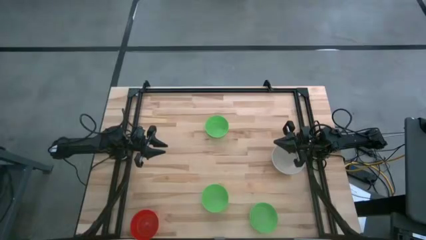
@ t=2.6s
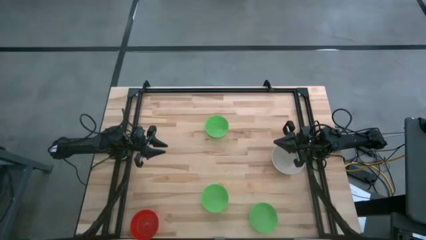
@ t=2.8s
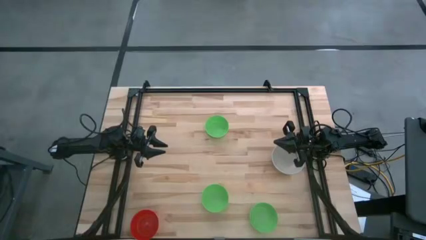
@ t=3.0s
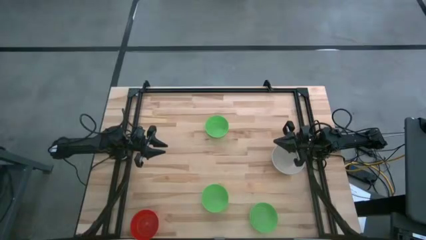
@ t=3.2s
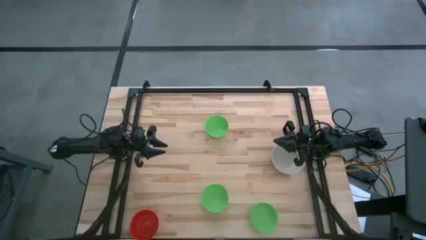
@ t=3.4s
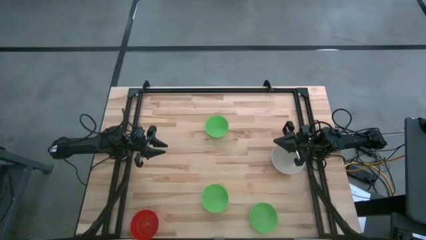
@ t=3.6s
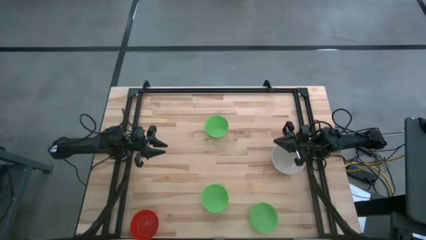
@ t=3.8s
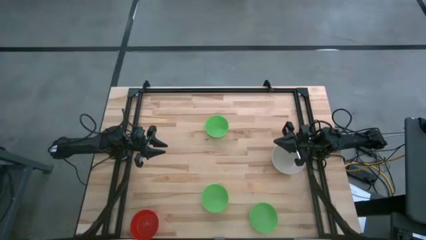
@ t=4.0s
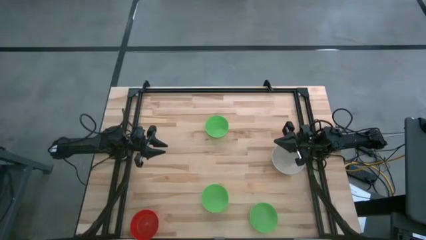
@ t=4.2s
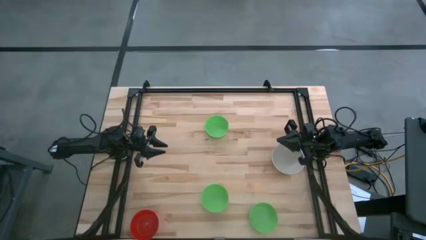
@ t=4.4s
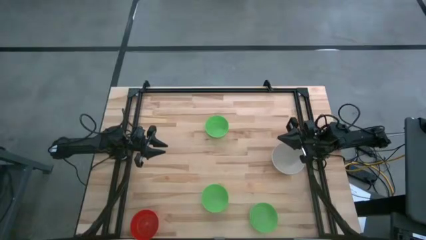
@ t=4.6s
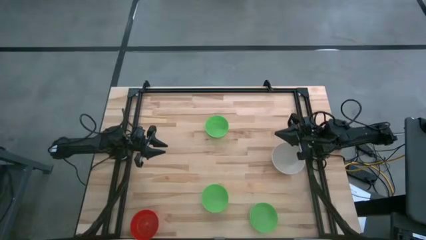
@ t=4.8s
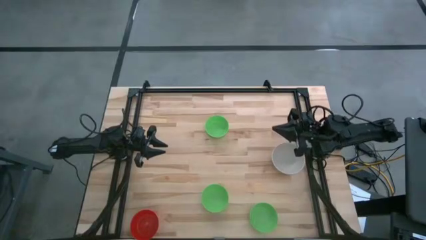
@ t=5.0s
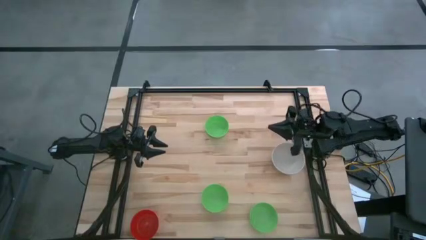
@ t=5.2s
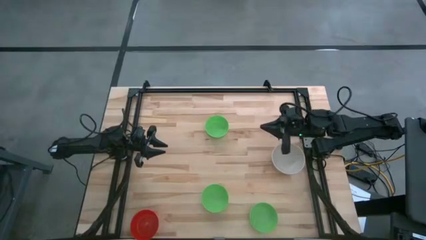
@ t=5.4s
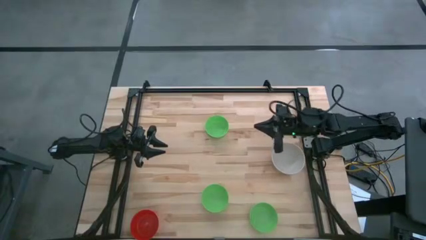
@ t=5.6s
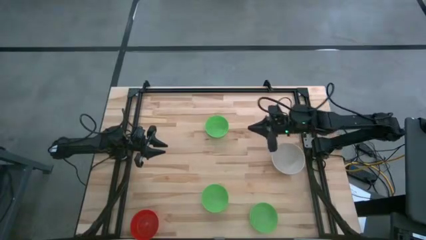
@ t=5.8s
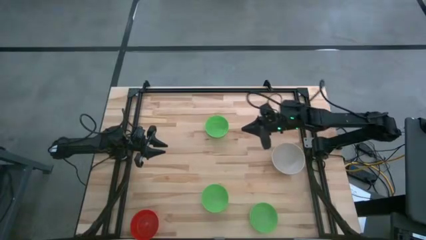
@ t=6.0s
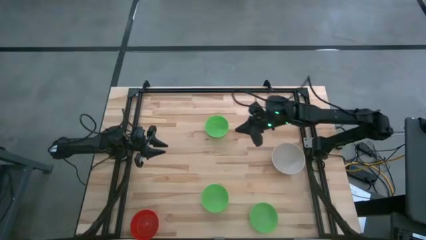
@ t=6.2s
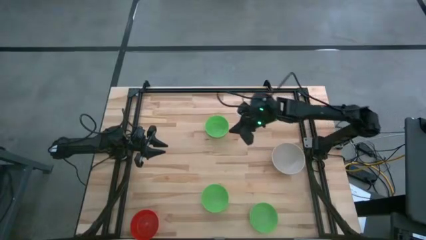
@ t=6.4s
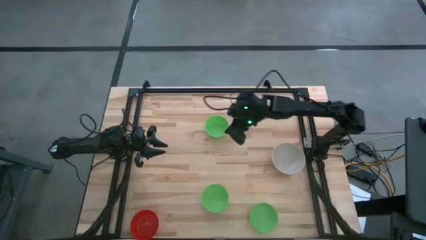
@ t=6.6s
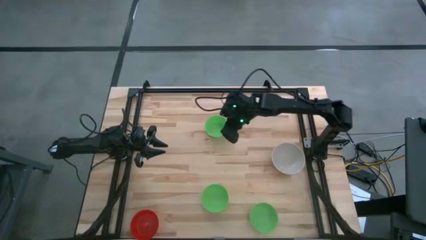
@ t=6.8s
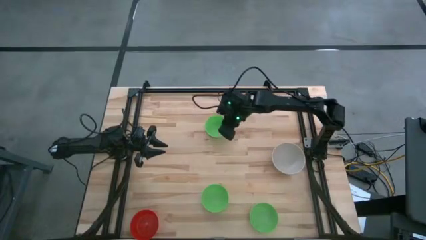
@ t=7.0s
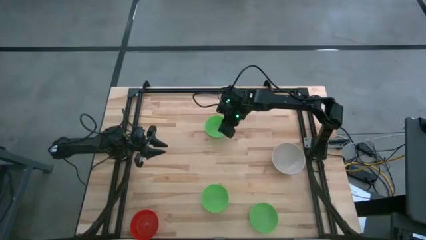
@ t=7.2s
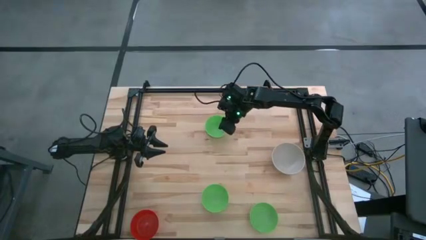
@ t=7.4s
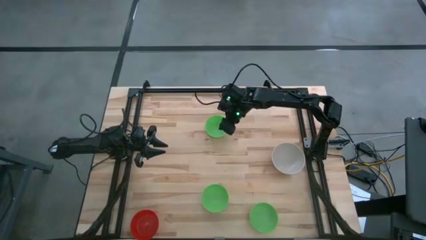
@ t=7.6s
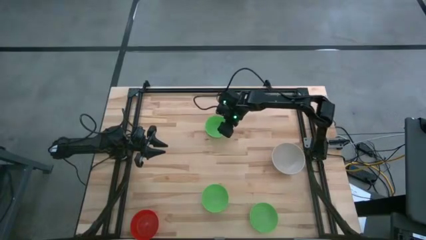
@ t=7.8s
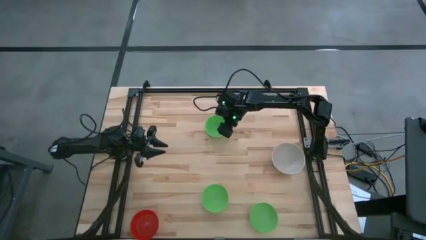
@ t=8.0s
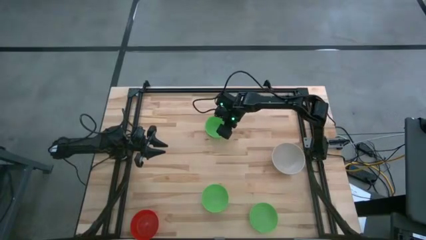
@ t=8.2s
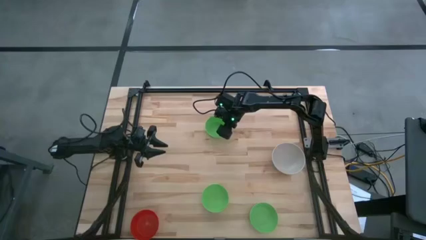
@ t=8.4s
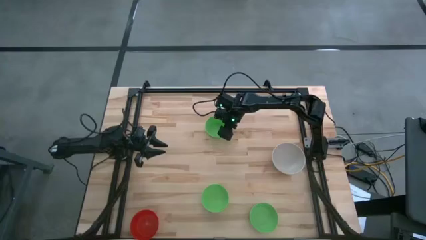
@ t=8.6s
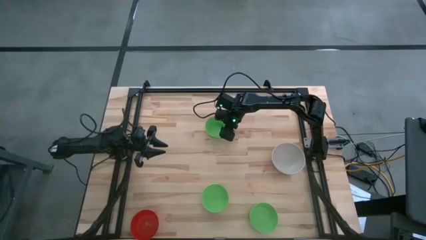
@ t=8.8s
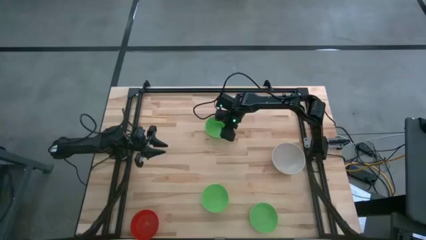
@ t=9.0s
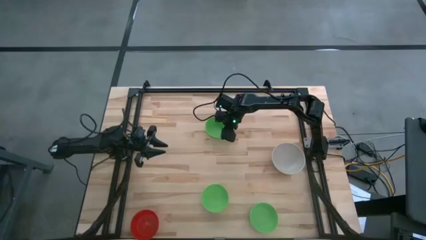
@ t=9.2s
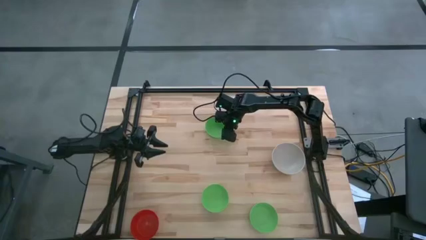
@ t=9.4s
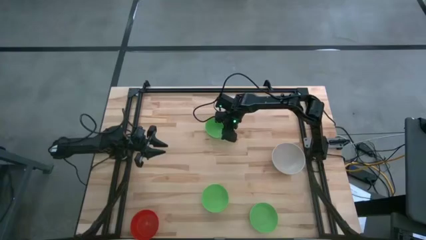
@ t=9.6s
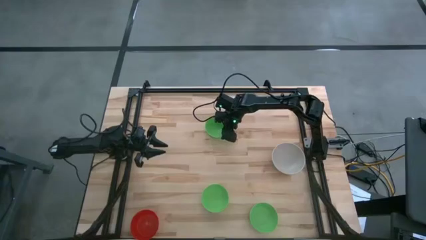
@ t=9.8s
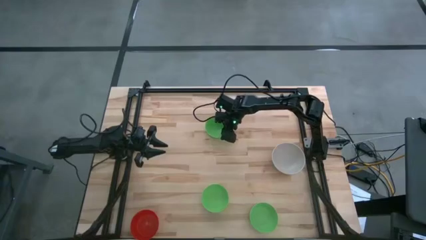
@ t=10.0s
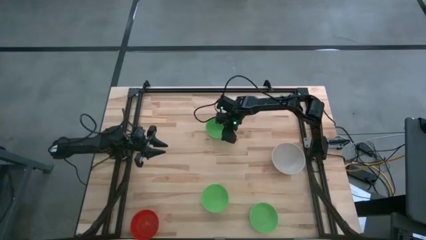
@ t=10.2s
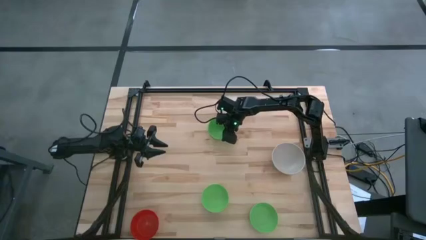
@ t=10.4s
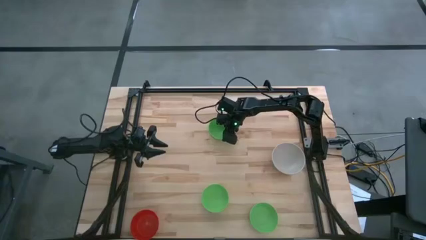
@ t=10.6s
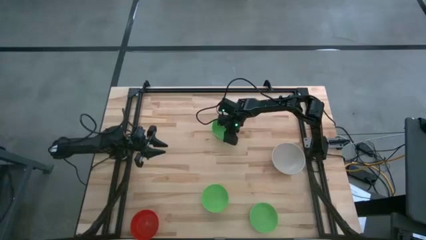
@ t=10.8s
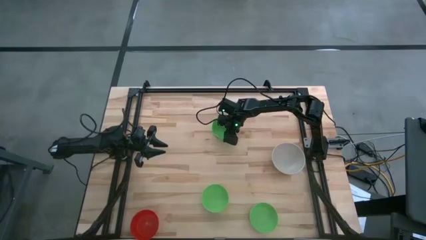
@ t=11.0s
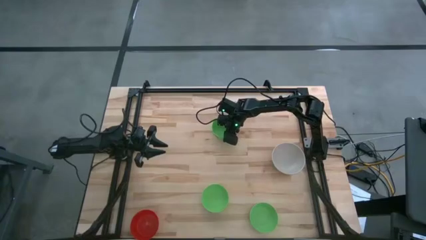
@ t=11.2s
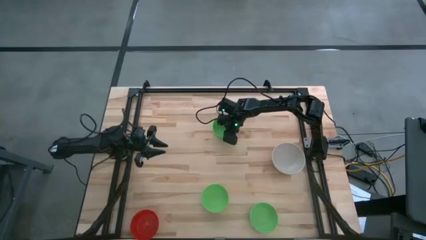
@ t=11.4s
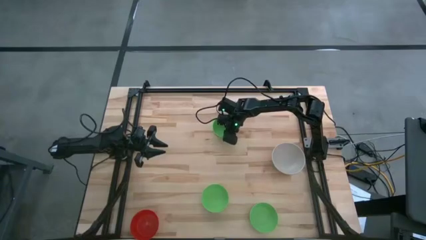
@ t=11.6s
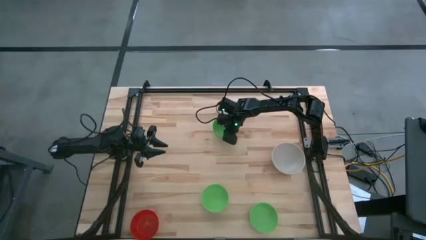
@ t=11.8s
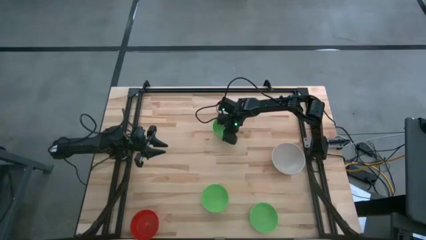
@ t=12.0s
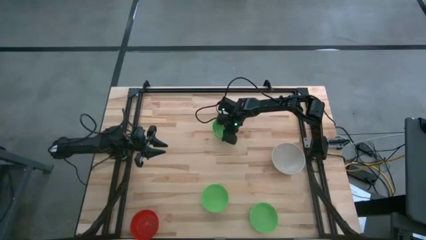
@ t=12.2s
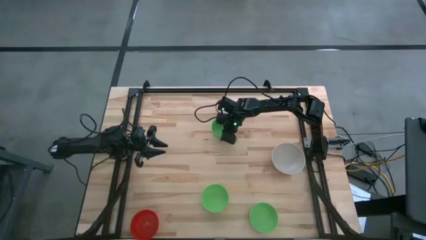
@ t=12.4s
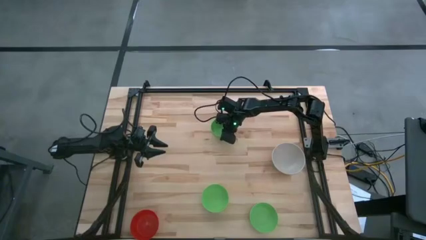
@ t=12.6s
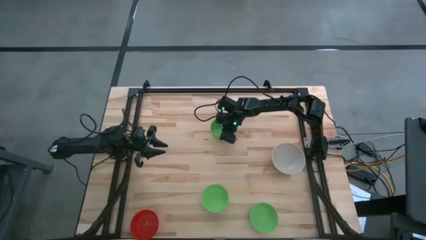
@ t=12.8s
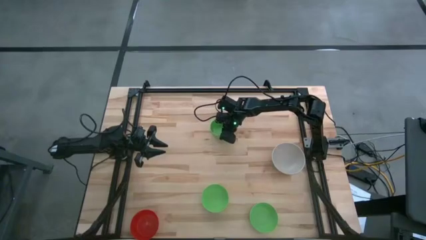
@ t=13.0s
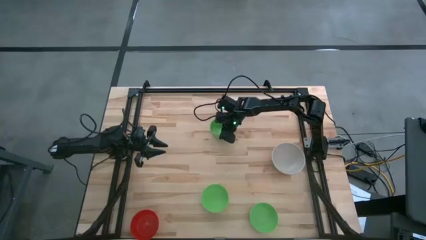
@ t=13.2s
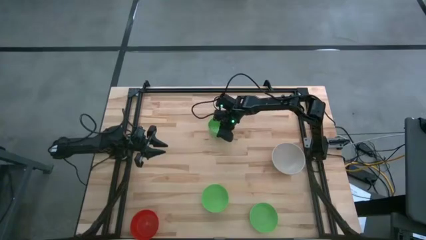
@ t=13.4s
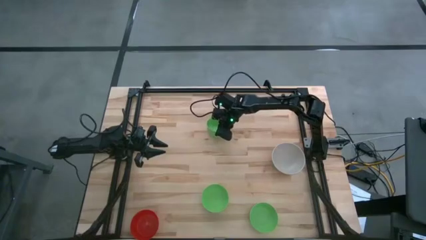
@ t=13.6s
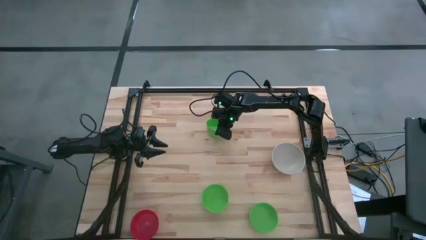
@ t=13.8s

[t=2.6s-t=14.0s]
Stack the top green bowl on top of the white bowl

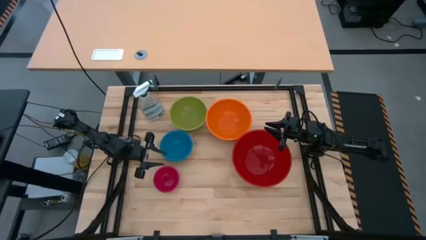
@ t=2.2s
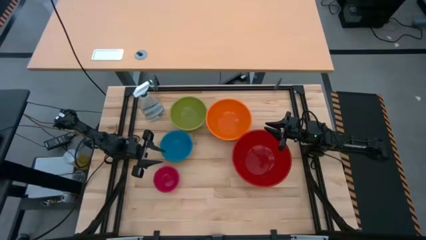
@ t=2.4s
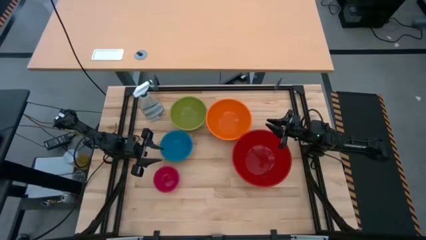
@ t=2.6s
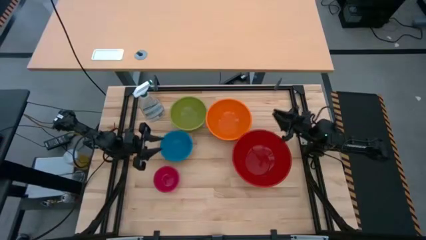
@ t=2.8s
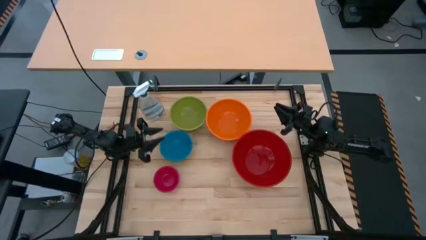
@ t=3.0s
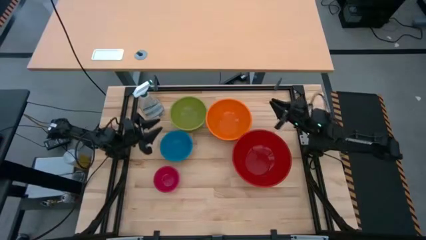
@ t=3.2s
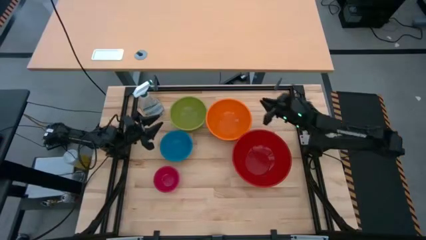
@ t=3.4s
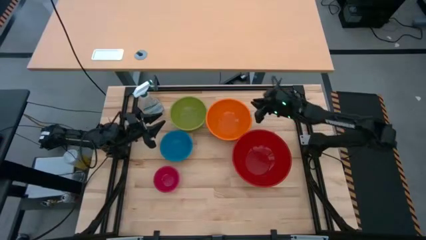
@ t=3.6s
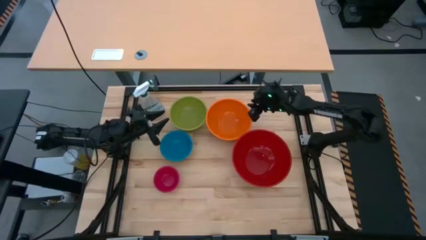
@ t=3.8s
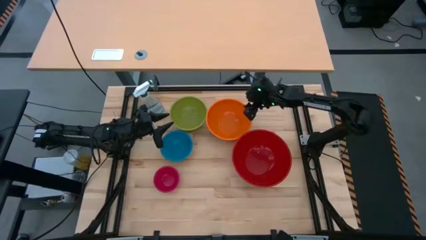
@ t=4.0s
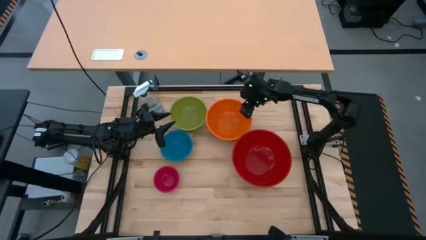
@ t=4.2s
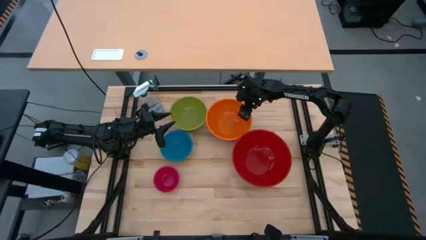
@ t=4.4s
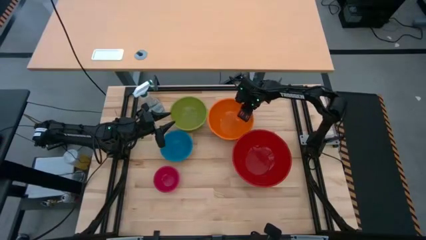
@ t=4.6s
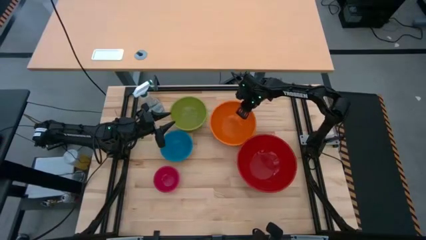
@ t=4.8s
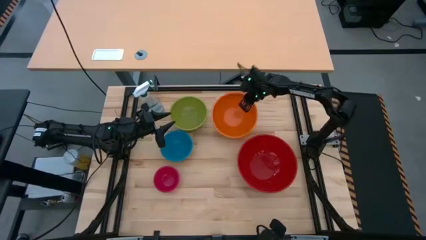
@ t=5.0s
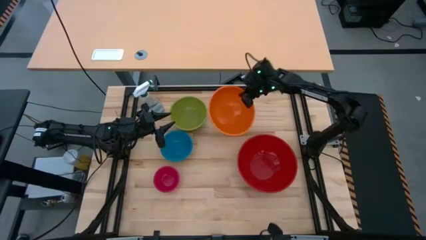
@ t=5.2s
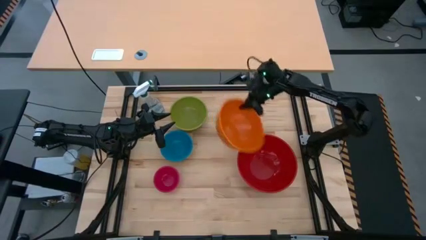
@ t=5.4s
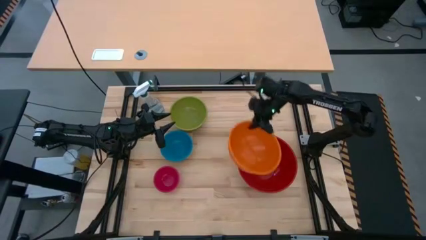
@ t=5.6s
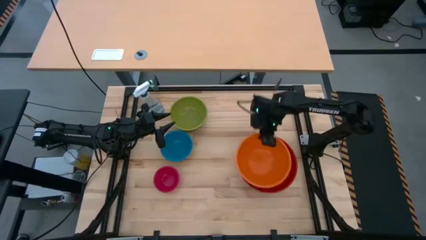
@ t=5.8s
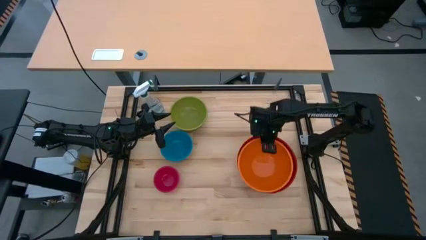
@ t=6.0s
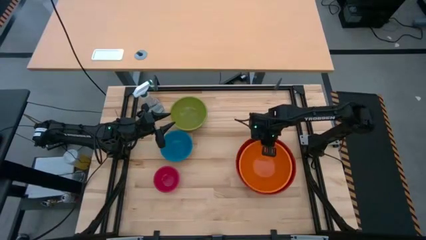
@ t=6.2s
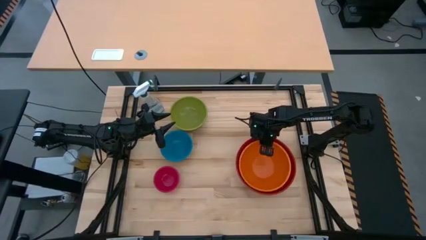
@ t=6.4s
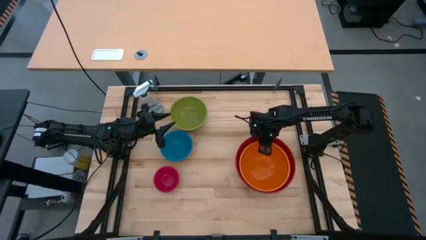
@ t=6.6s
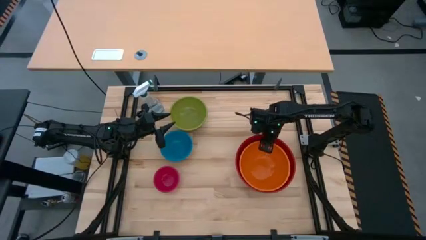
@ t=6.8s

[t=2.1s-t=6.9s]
Stack the orange bowl on top of the red bowl

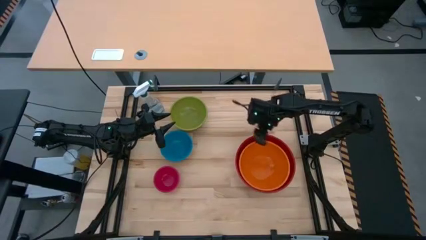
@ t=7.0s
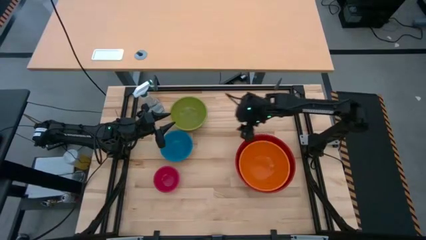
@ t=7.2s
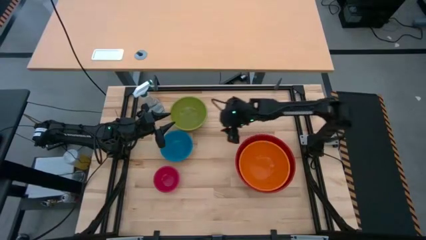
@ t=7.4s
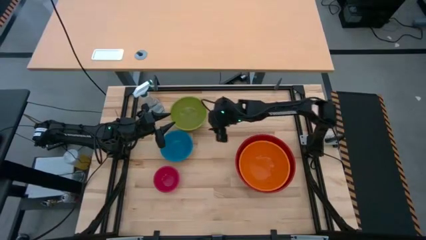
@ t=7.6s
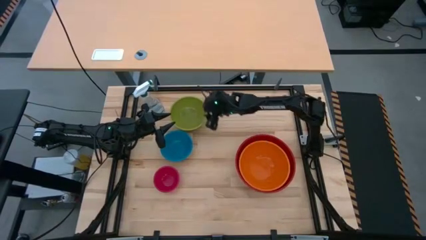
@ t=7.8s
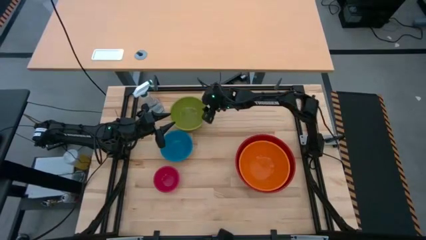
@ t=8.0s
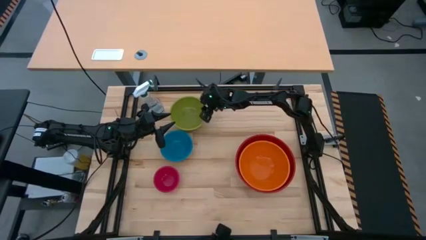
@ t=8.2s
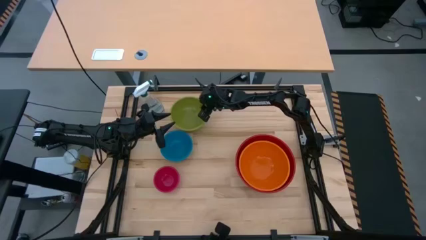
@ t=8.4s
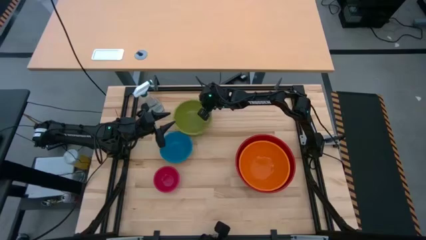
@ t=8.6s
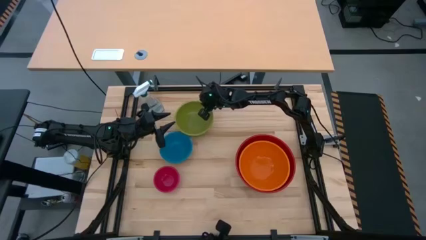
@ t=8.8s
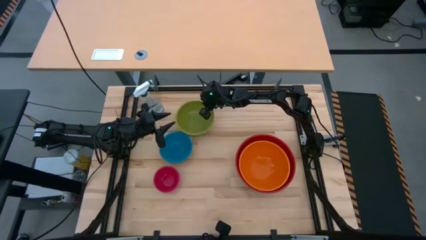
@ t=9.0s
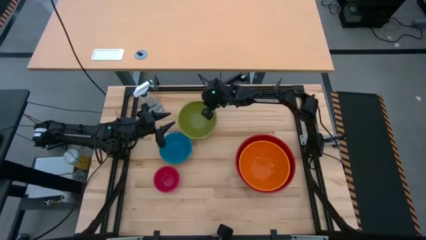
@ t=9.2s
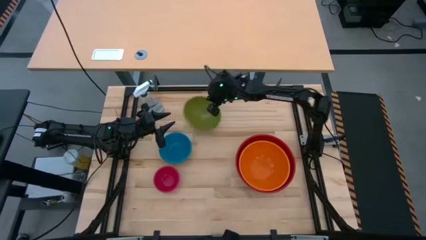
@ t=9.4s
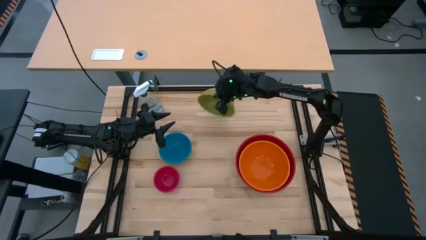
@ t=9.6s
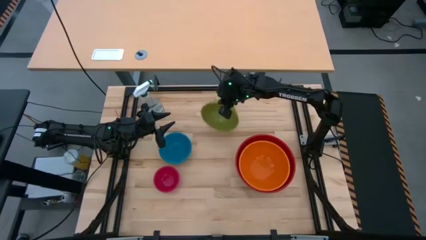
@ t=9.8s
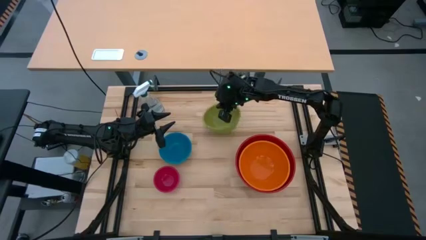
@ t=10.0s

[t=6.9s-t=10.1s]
Stack the green bowl on top of the orange bowl
